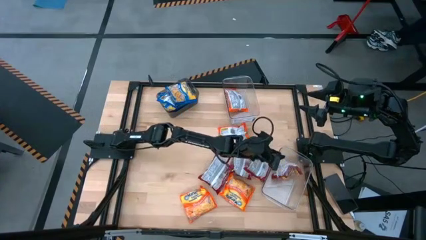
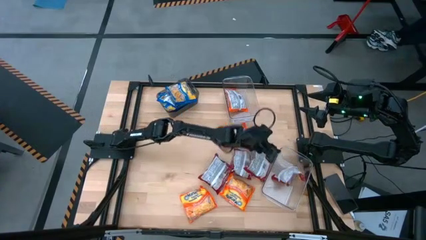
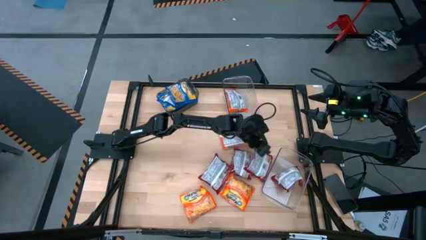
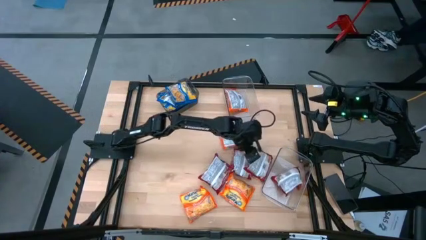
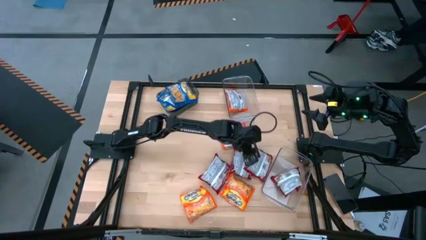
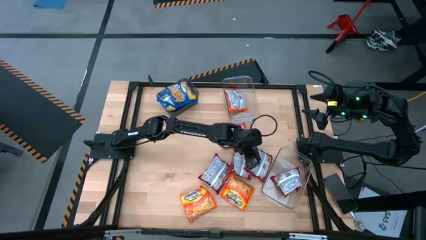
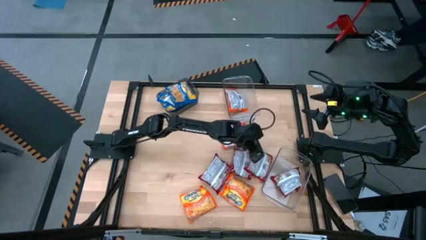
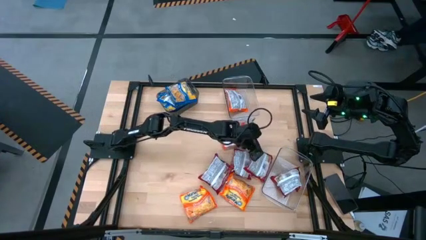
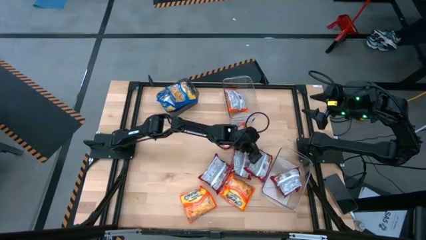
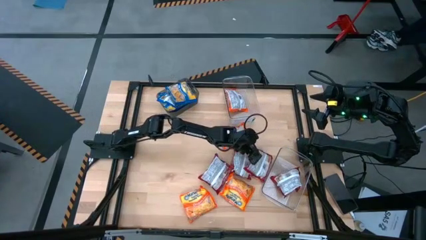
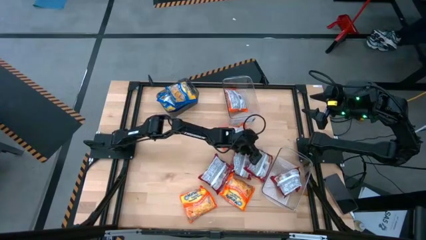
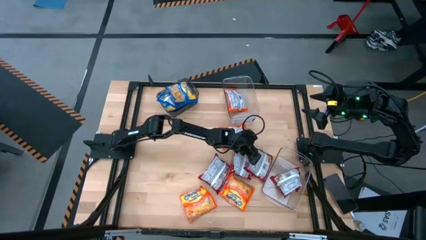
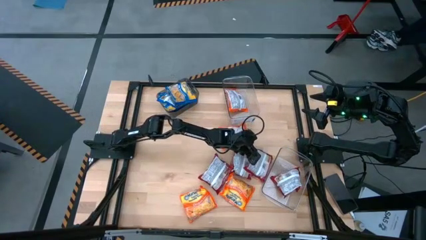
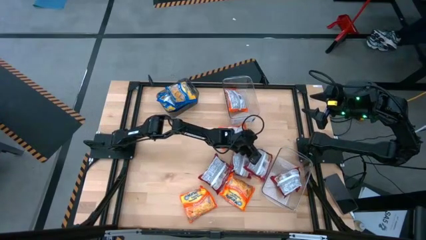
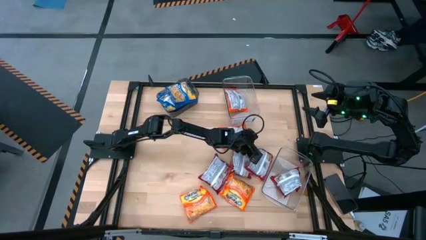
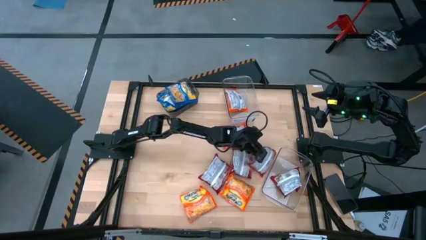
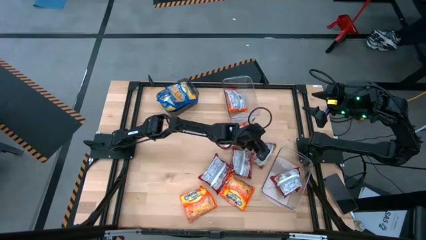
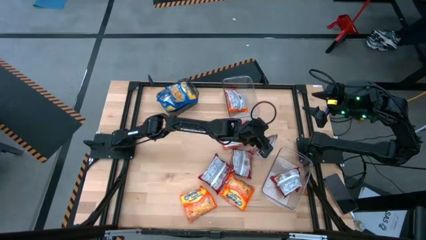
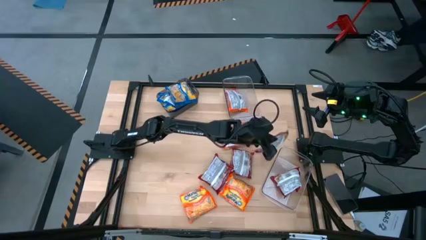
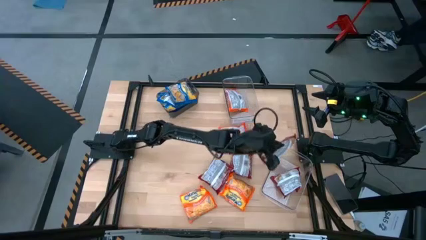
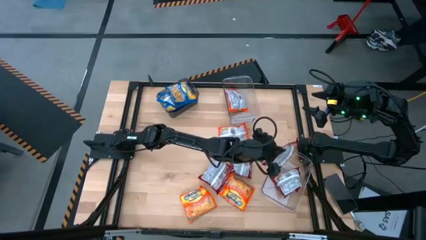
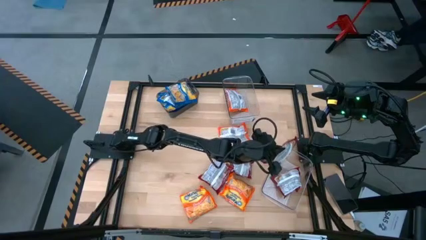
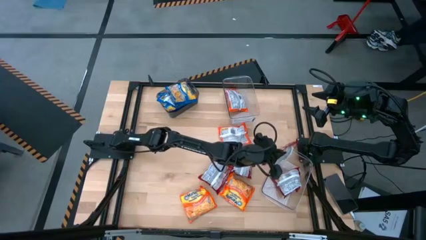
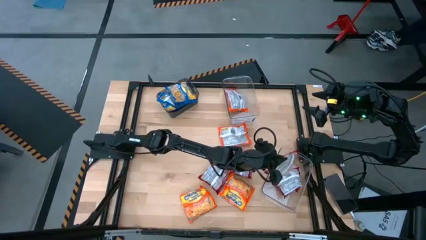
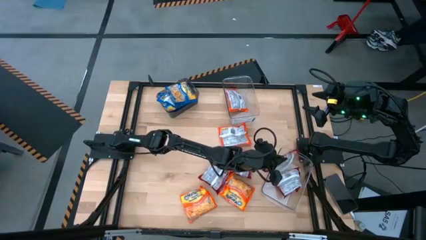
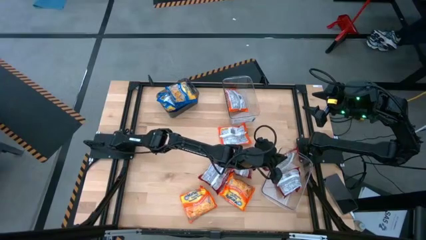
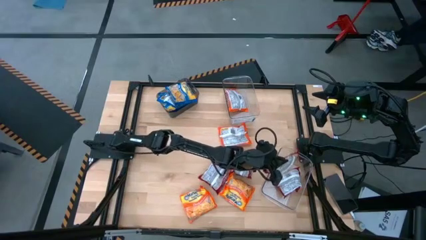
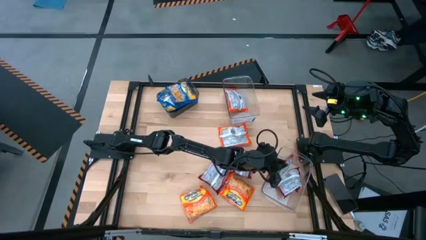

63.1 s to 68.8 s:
Task: Sort Maruchan noodles
Put the red noodle pack into the bottom transparent bin

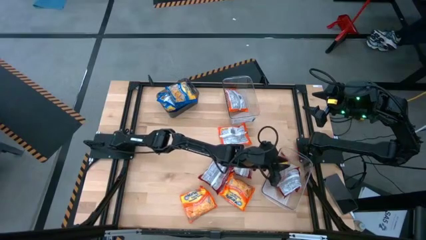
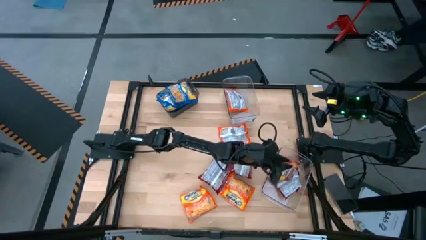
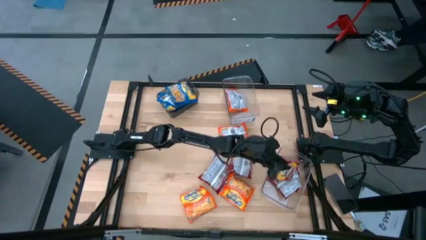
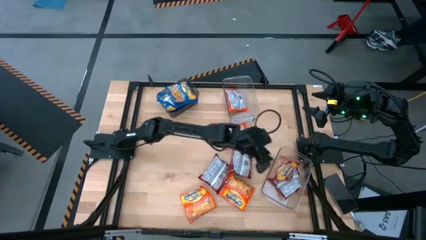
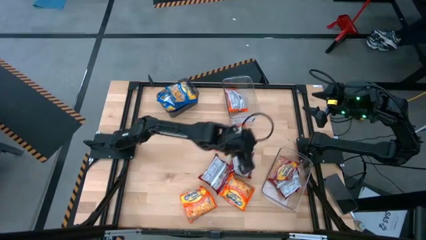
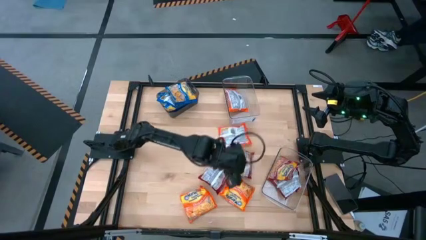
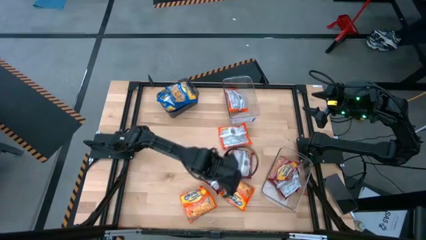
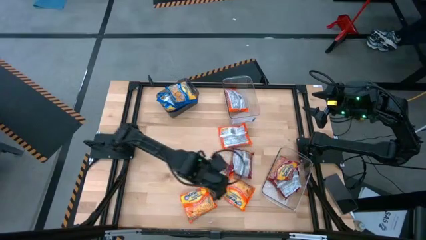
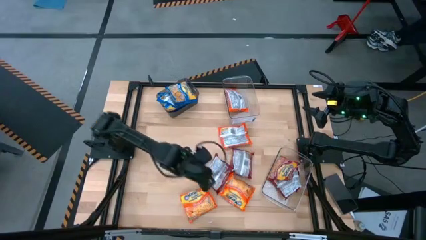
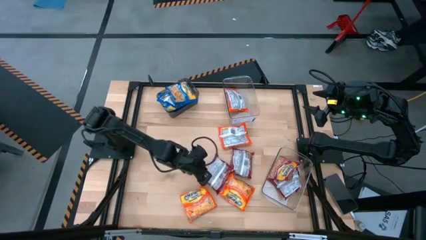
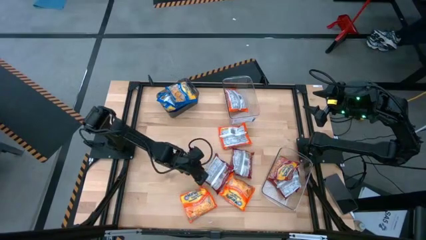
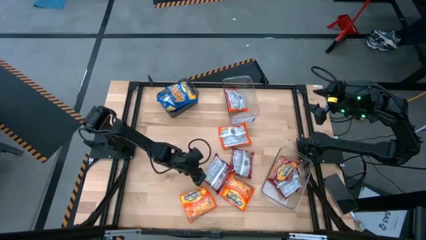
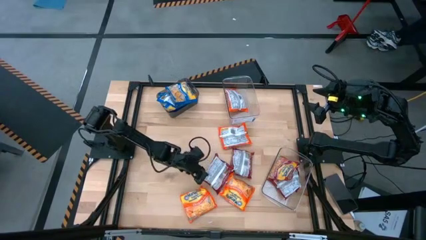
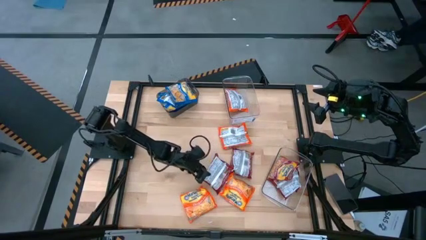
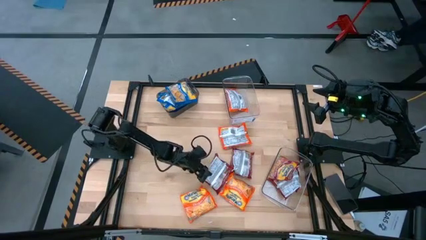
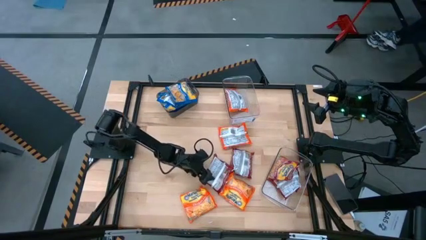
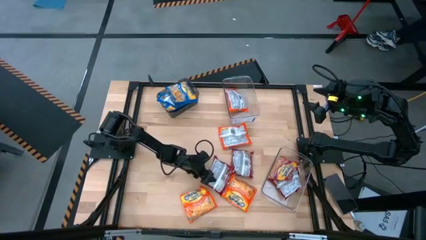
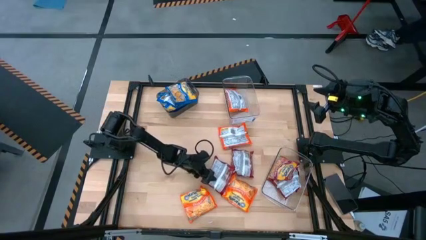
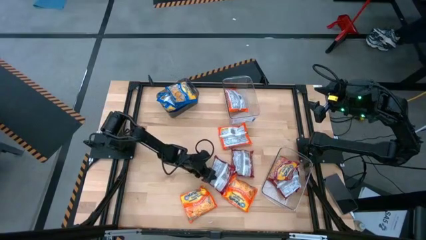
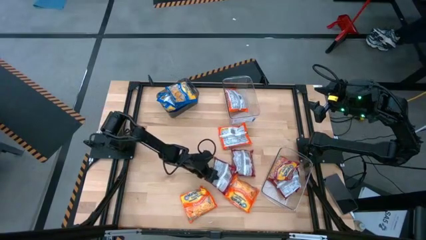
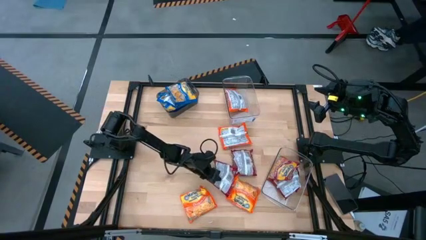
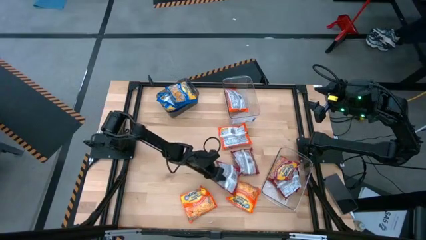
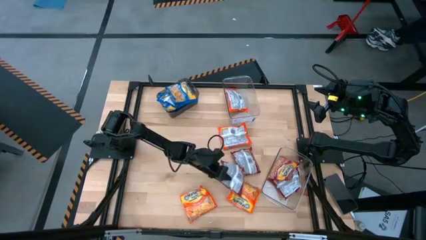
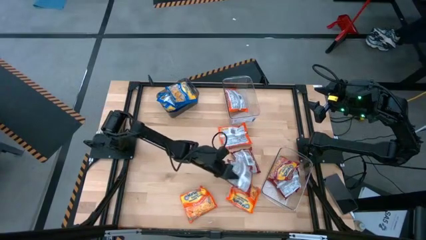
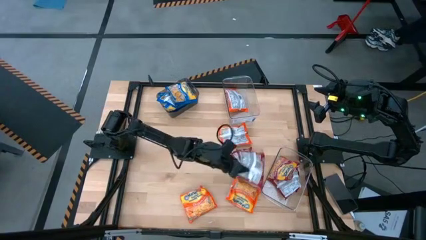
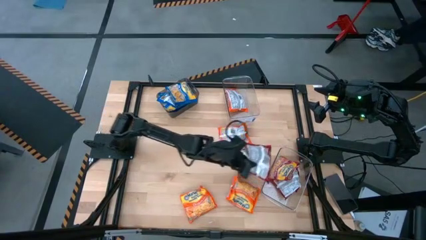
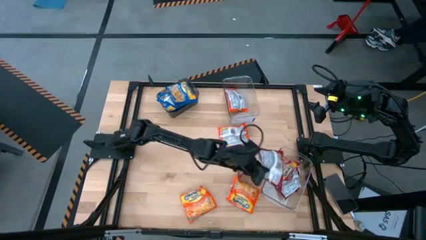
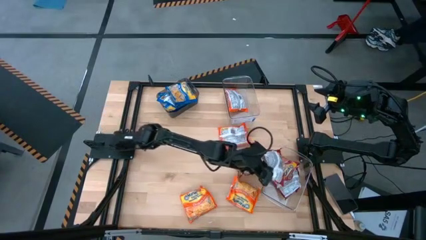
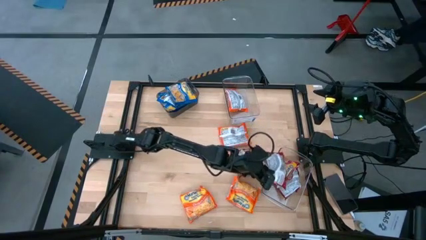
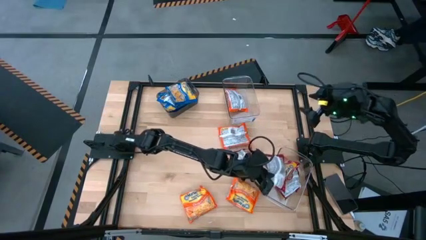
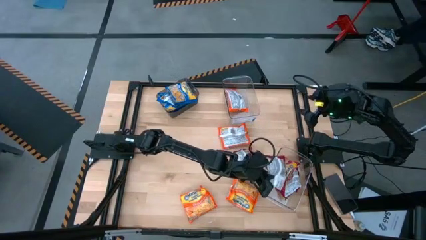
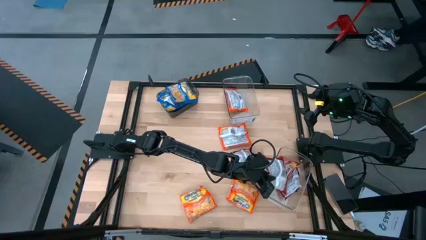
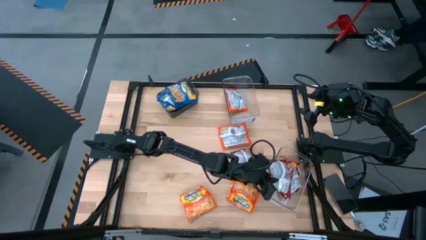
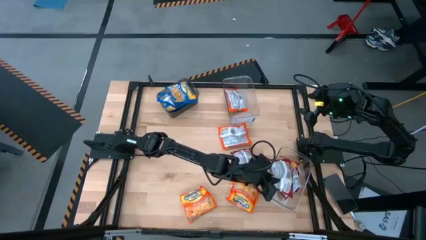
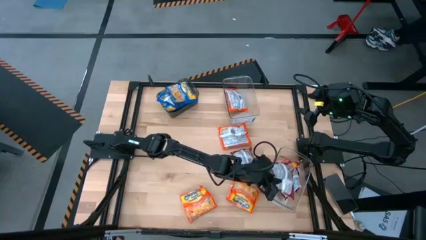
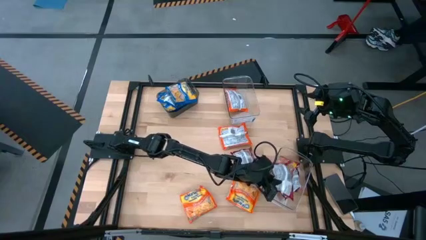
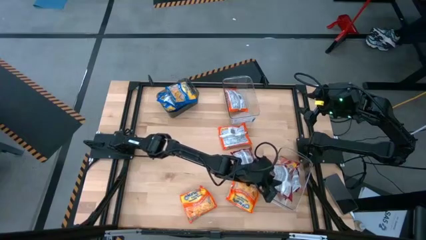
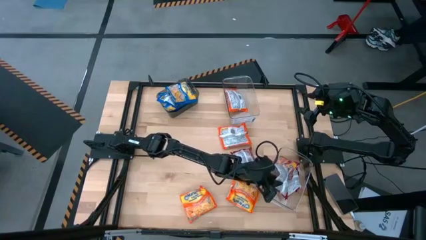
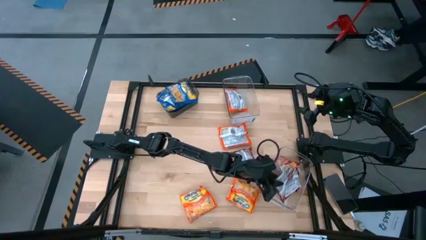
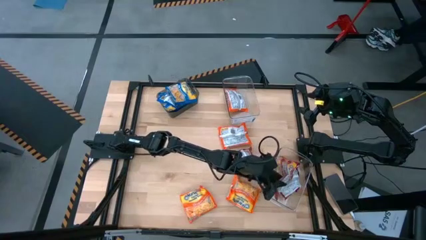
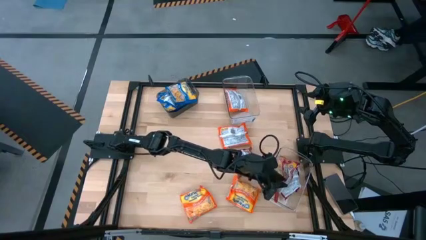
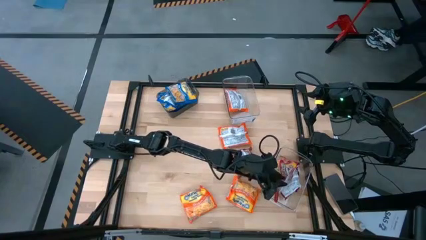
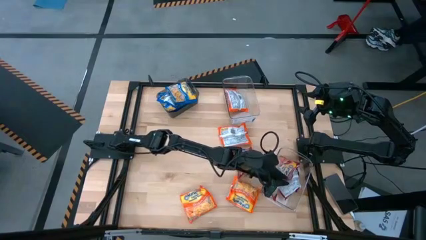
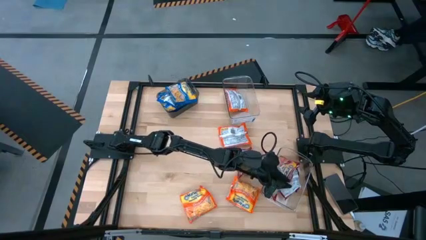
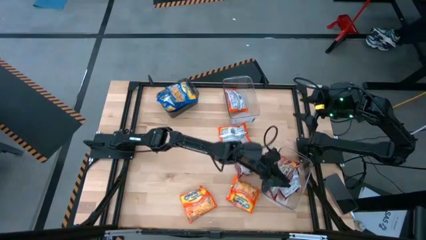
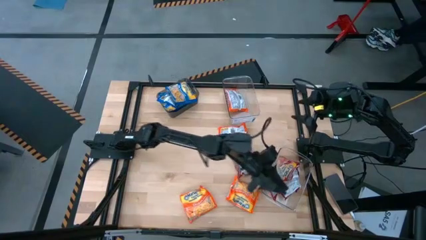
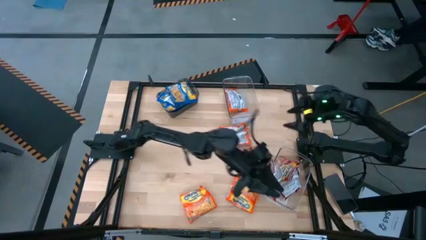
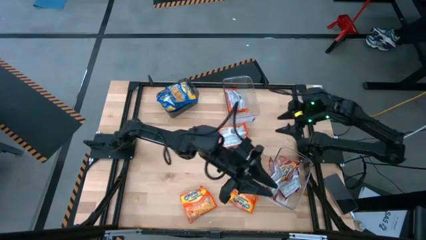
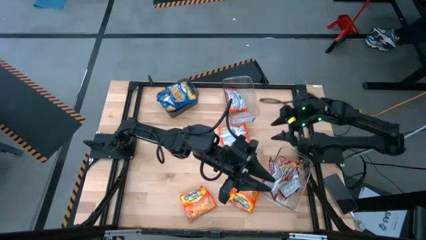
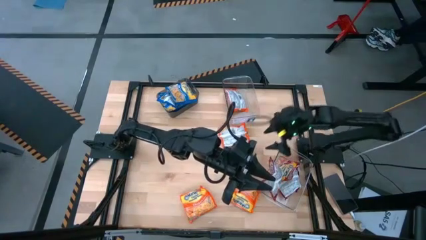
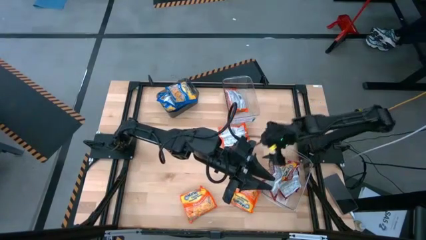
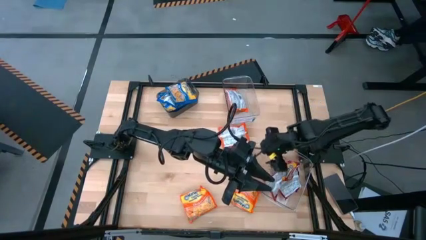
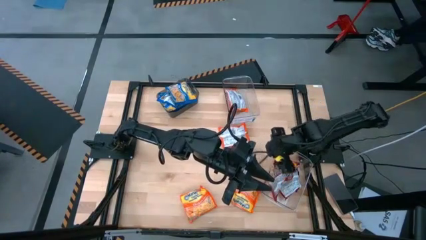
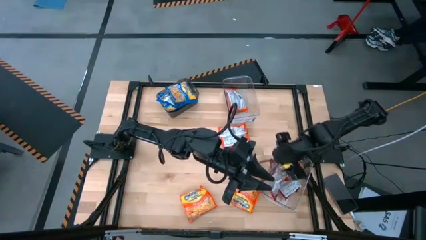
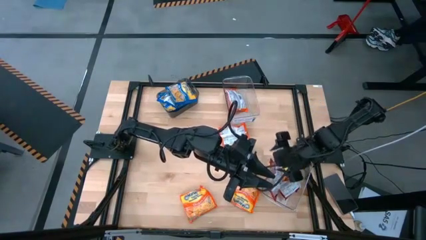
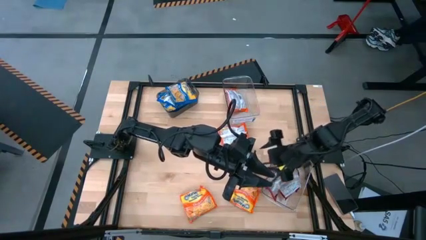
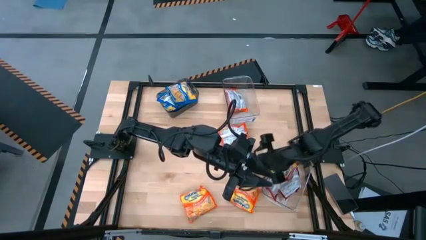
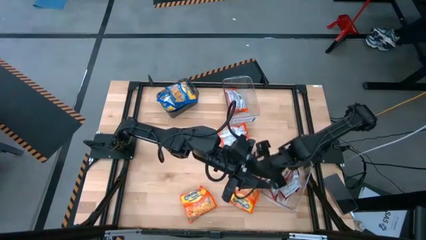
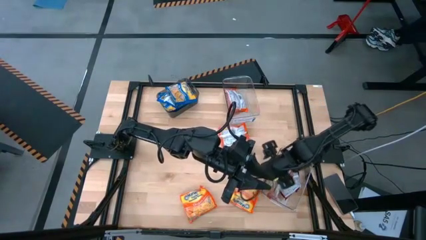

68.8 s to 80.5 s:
Put the red noodle pack into the bottom transparent bin
